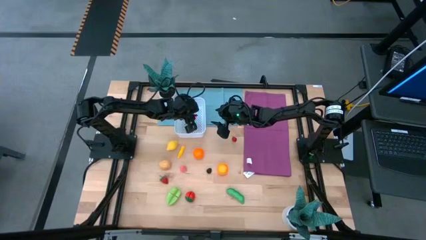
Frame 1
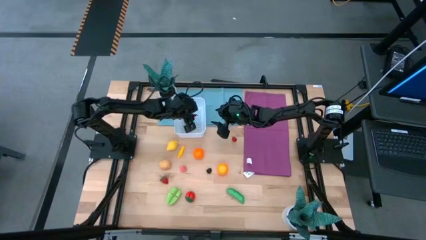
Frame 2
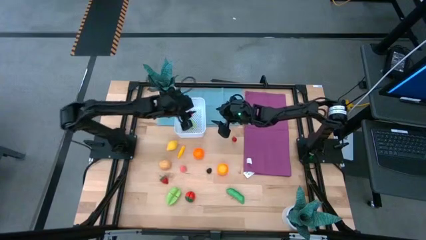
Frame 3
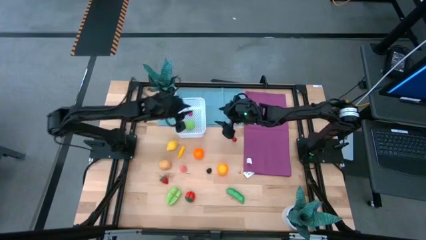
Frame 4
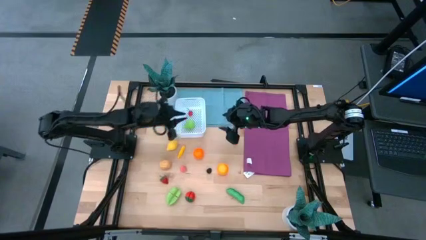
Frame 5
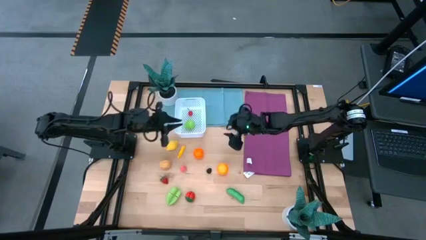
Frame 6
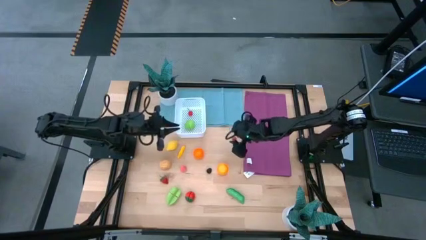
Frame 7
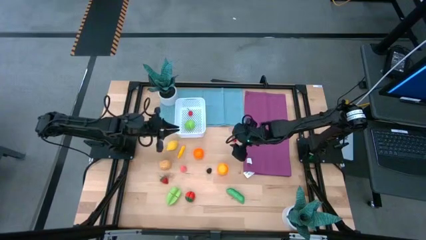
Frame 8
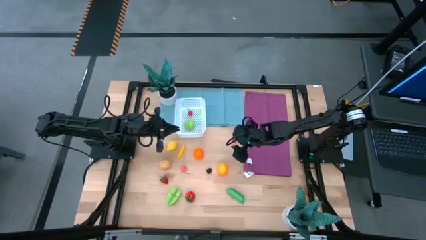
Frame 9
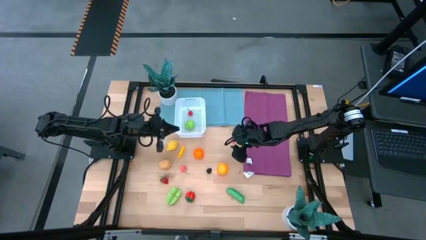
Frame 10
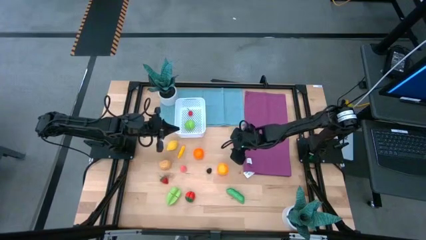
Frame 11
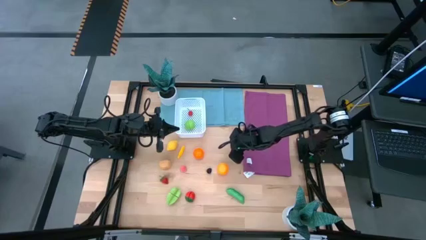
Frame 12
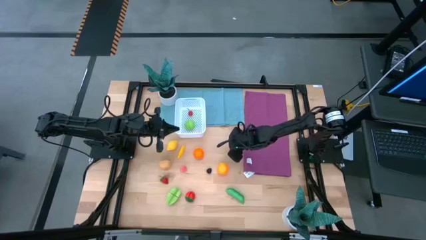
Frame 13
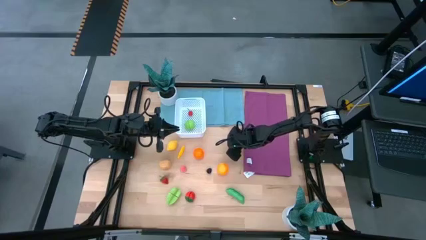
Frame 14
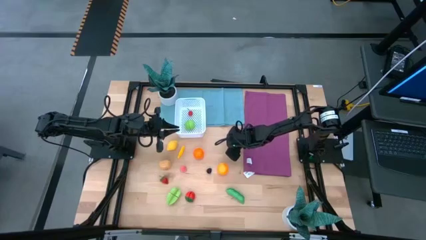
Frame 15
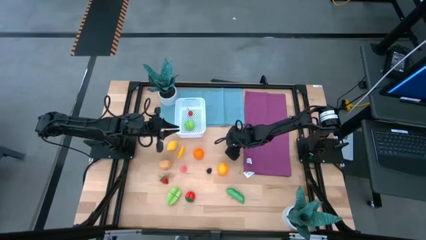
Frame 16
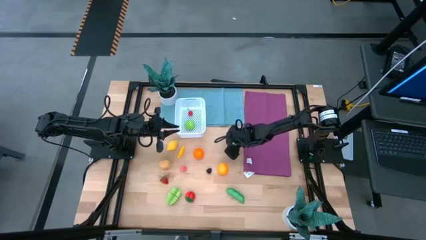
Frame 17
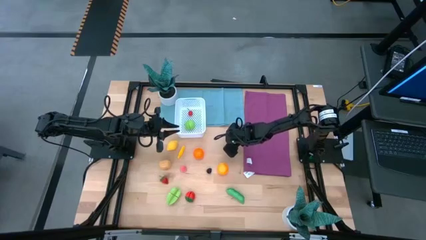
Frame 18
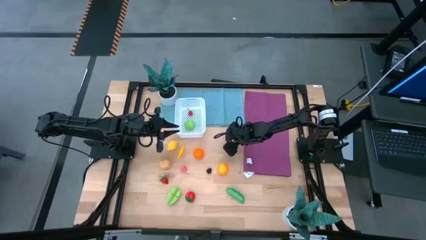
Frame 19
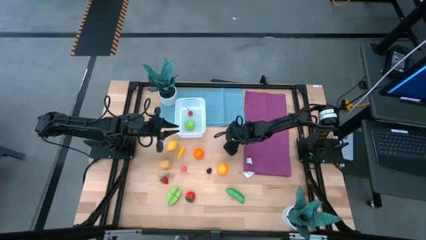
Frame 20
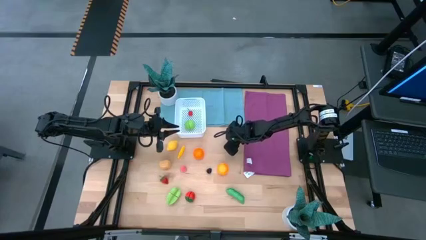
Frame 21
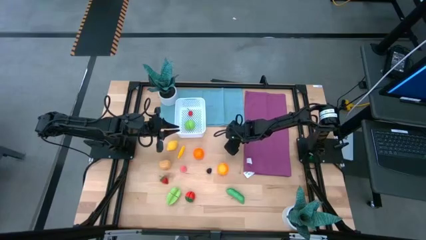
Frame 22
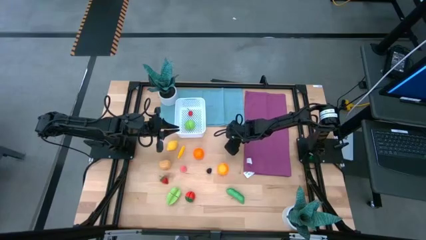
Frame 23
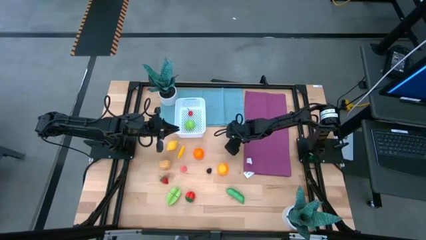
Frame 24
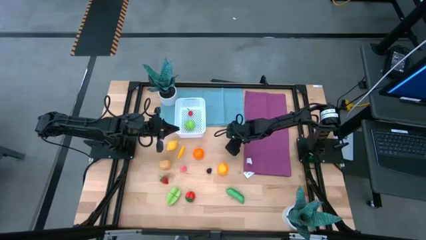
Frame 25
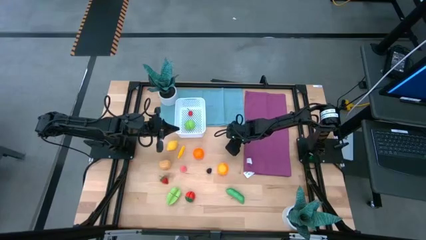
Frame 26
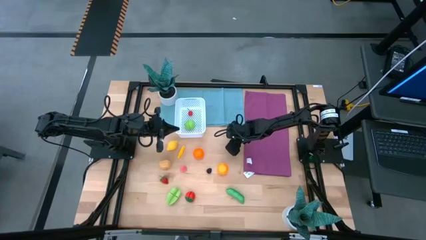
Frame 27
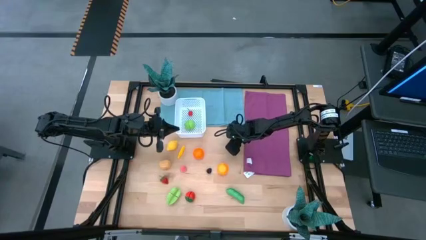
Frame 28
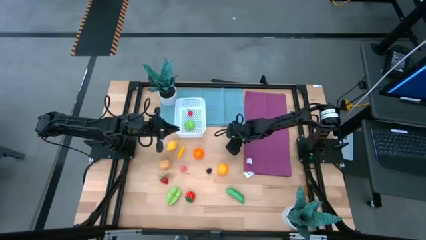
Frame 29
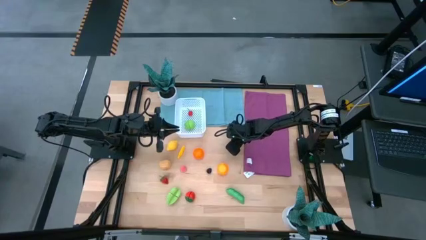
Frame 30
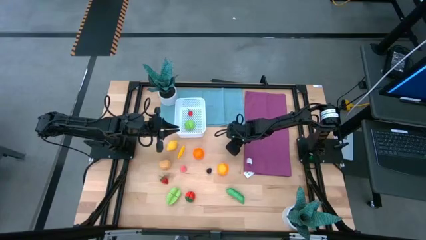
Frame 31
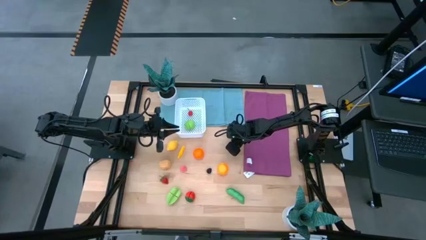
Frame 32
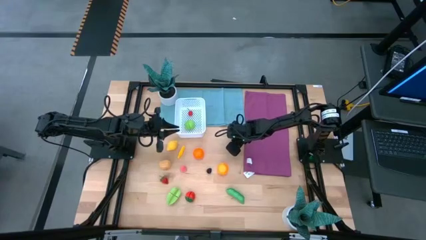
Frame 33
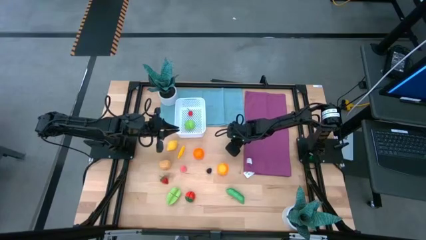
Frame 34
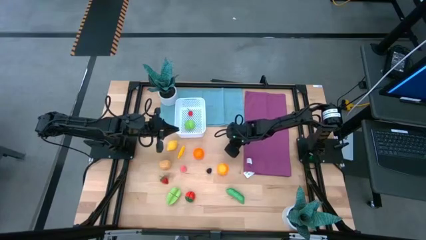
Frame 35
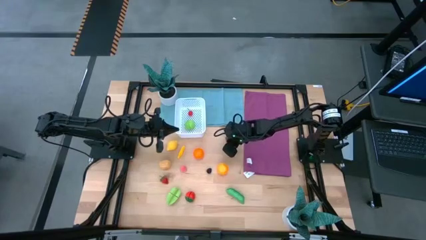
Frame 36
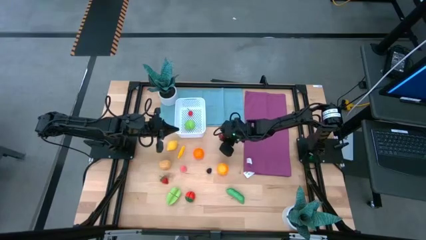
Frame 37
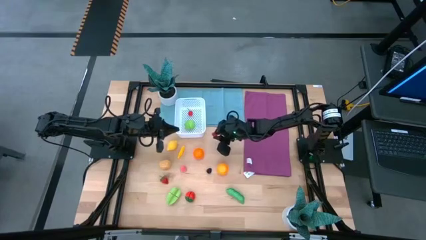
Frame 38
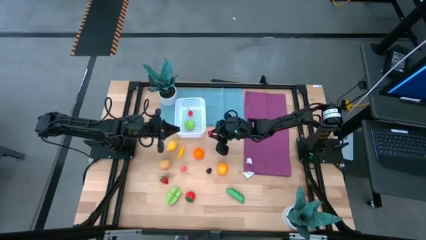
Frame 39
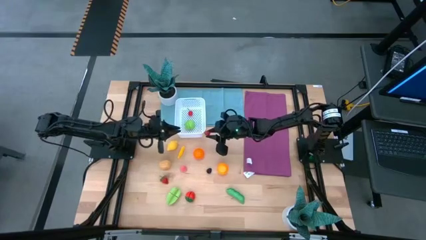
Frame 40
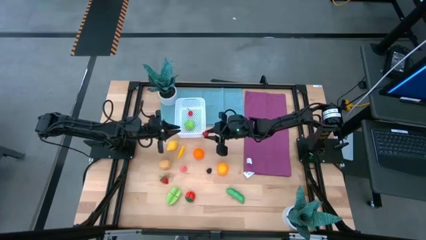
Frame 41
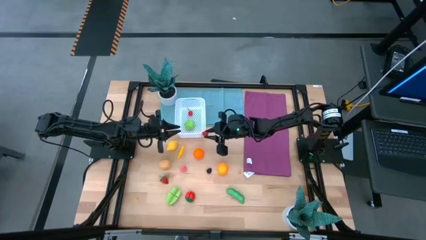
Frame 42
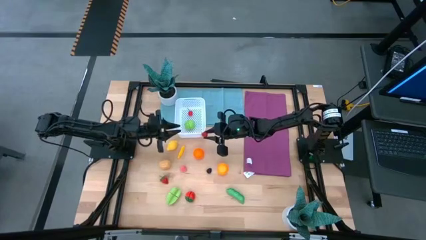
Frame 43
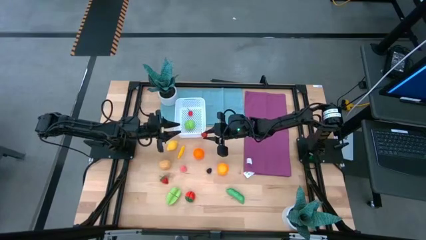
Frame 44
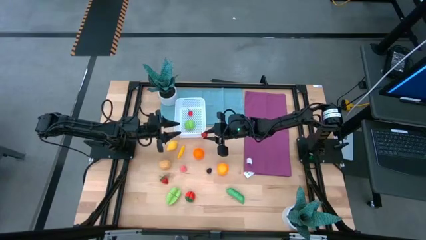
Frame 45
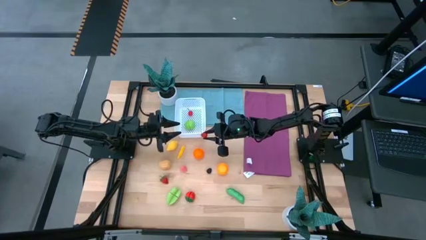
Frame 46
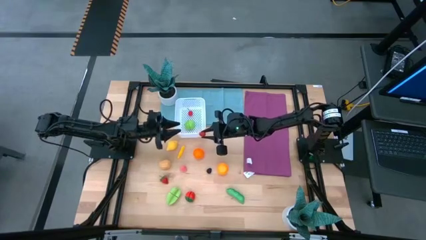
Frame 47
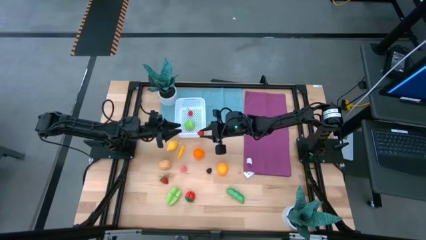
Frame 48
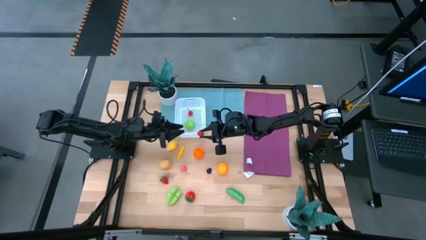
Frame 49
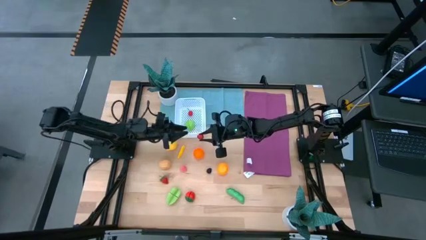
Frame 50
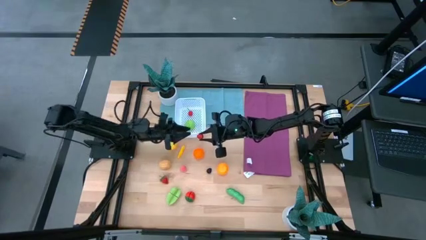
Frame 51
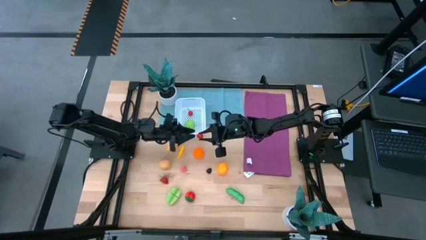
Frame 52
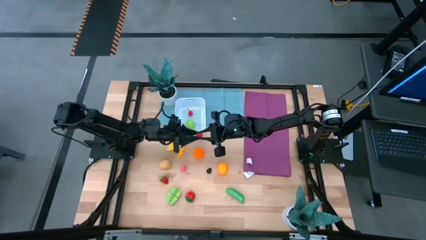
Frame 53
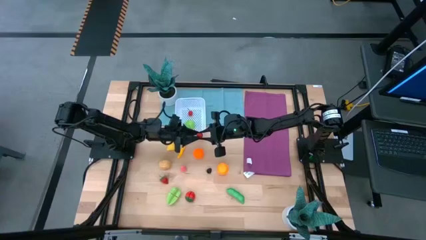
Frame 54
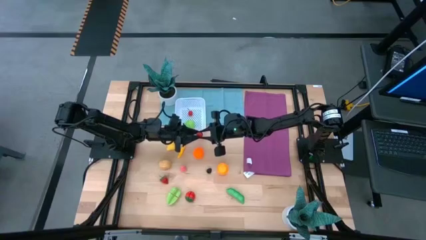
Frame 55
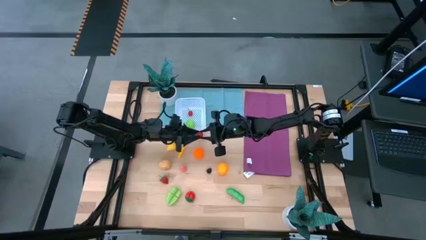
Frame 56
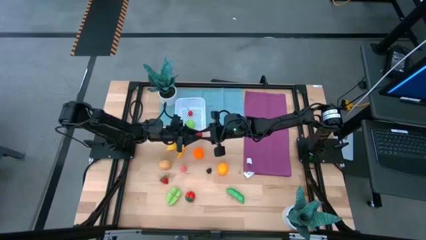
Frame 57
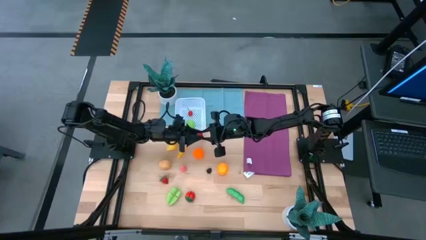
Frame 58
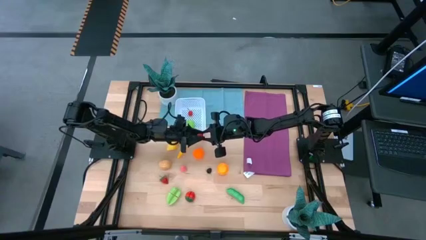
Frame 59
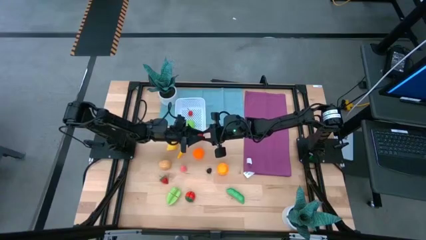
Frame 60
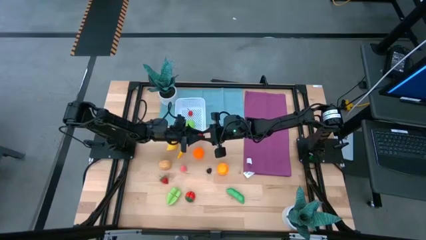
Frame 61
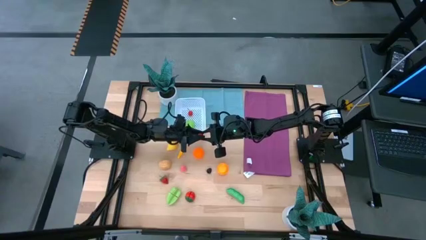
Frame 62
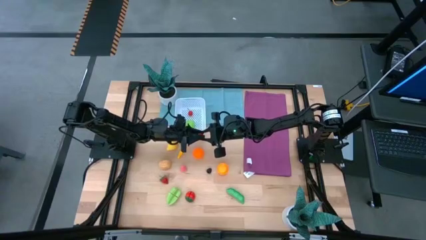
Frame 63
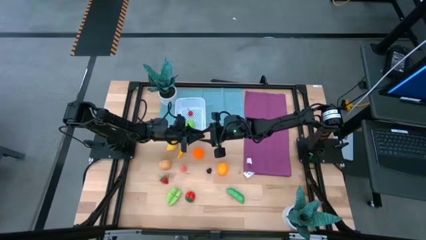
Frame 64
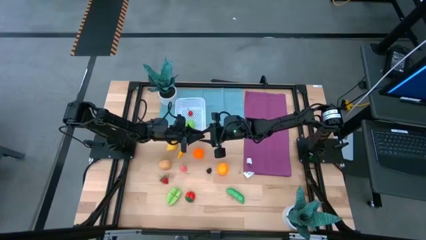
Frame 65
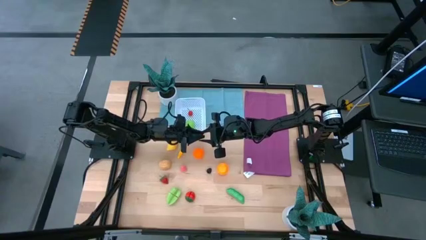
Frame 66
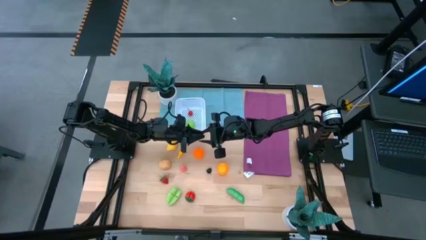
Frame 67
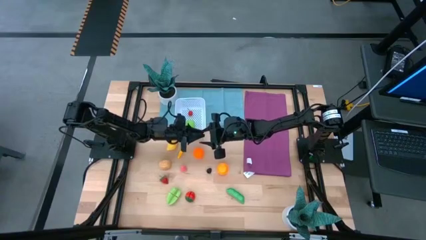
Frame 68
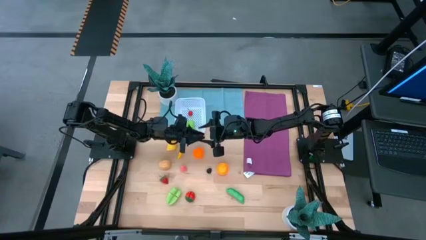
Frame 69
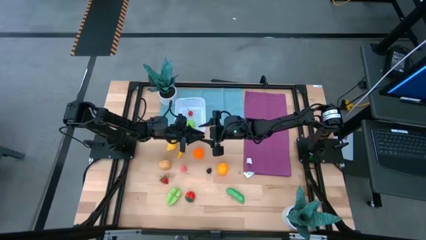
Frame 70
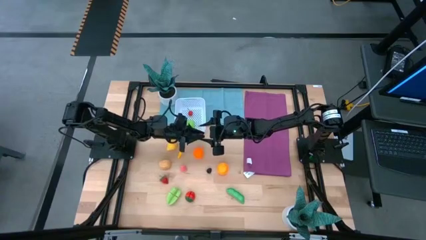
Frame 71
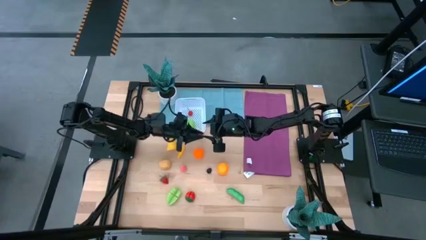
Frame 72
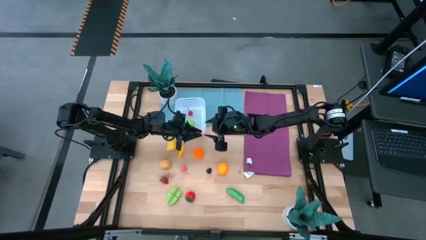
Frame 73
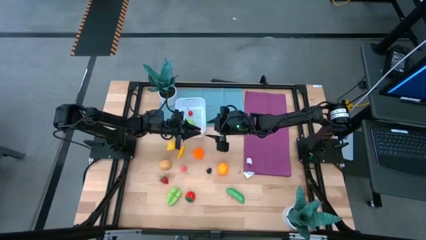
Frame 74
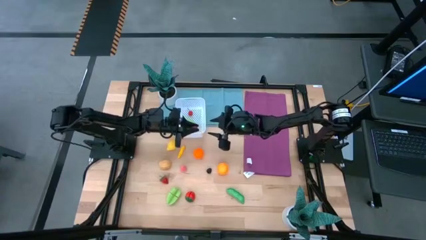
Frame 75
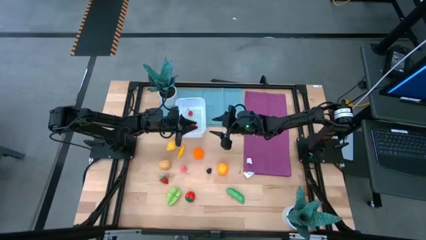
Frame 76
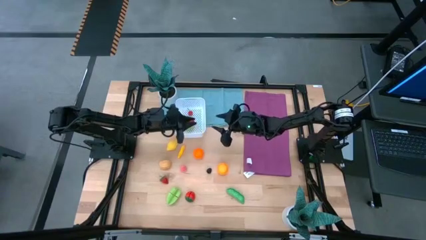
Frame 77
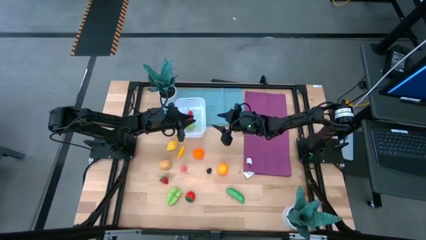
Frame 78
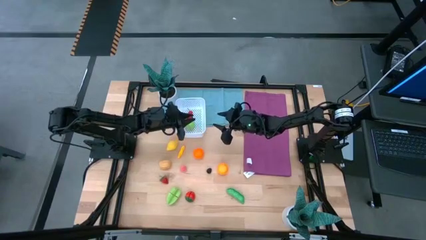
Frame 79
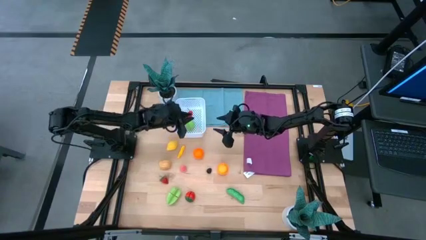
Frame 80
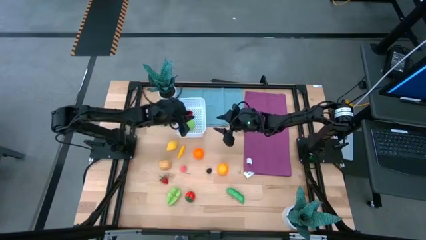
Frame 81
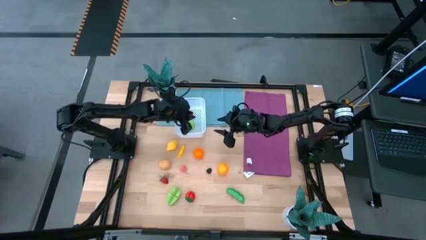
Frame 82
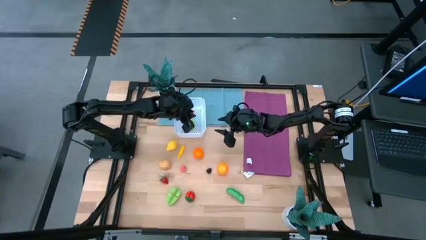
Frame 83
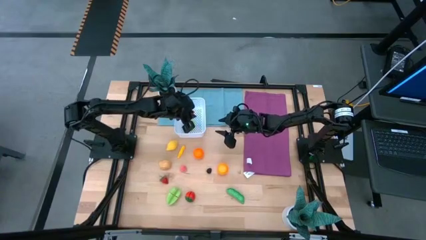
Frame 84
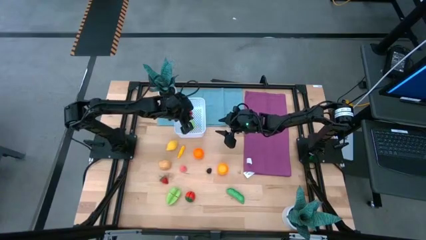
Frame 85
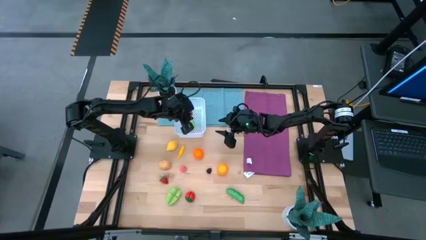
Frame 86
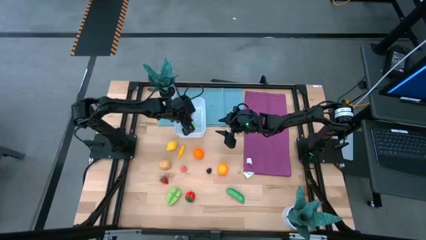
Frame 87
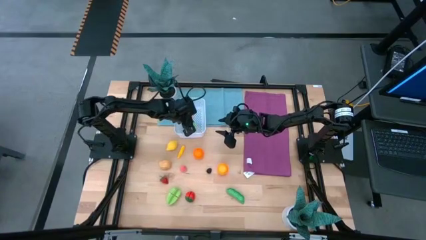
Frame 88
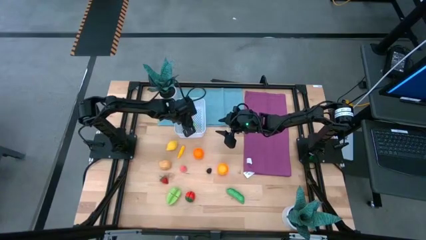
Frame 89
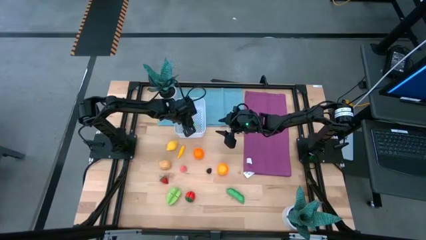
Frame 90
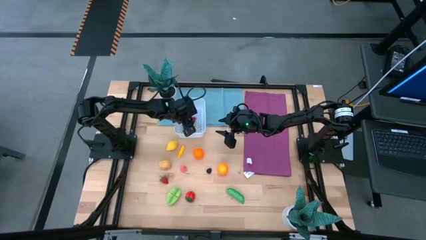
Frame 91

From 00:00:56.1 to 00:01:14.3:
Task: Pick and placing Produce into tupperware
Put the red raspberry into the white basket
